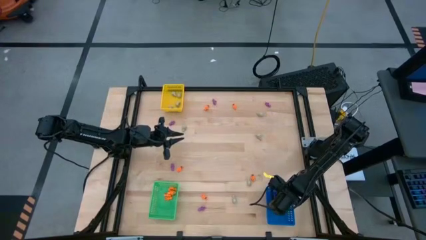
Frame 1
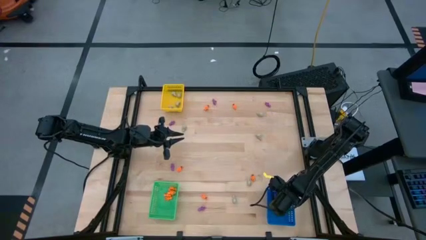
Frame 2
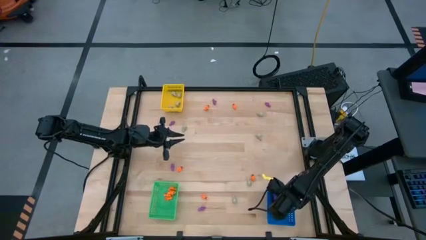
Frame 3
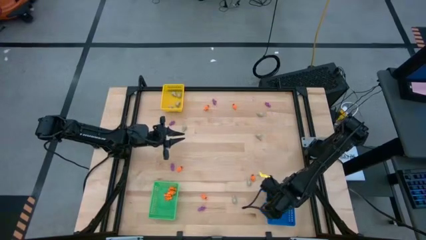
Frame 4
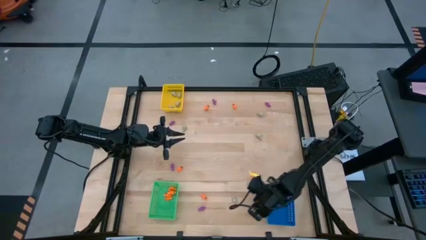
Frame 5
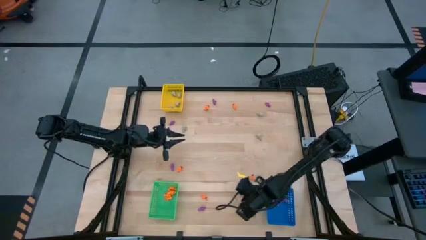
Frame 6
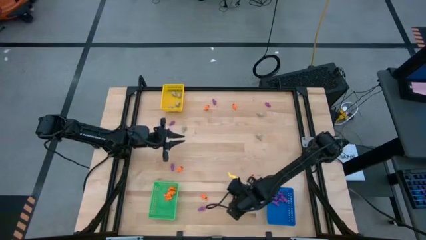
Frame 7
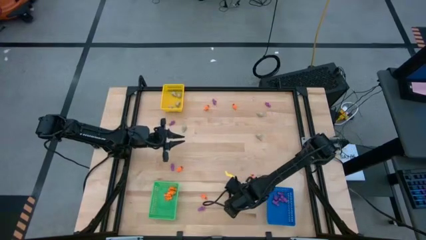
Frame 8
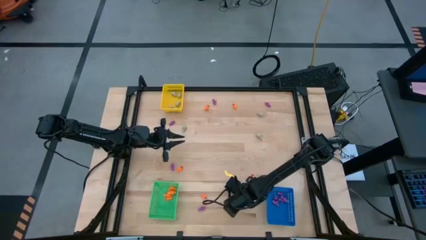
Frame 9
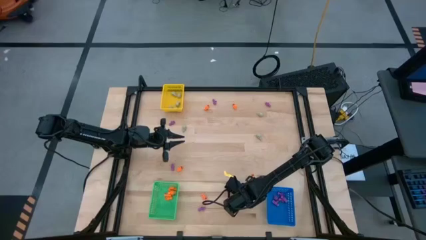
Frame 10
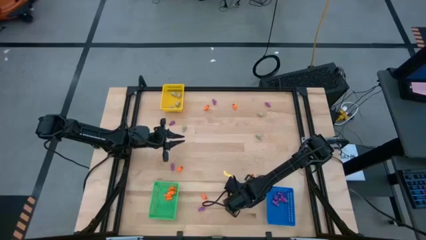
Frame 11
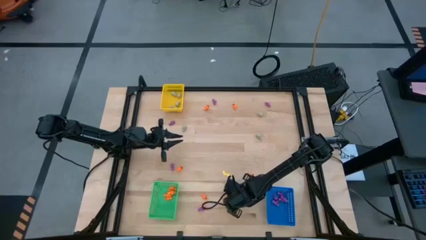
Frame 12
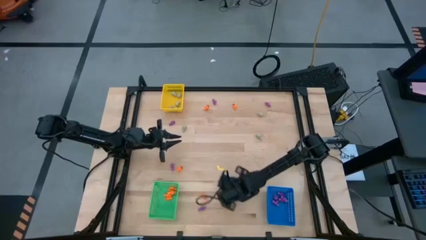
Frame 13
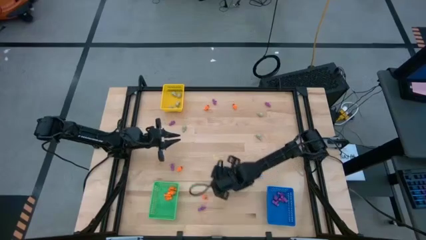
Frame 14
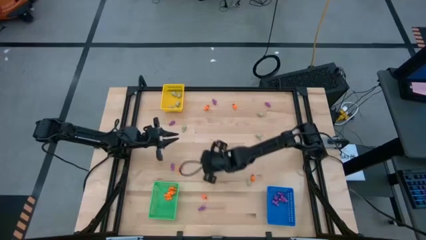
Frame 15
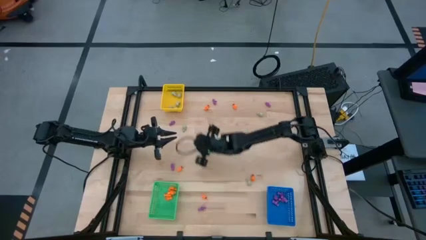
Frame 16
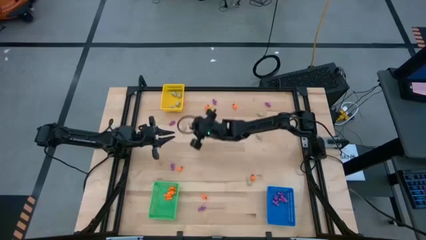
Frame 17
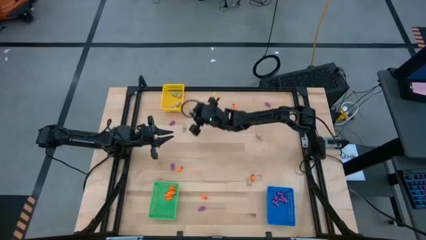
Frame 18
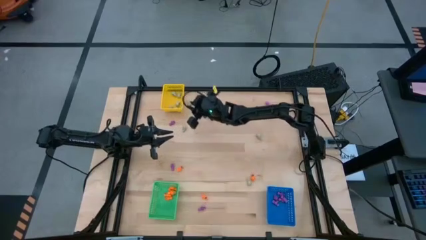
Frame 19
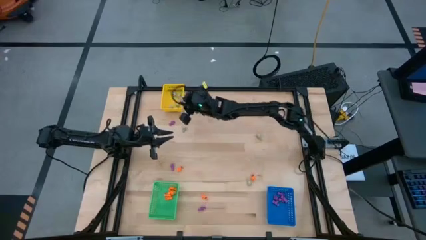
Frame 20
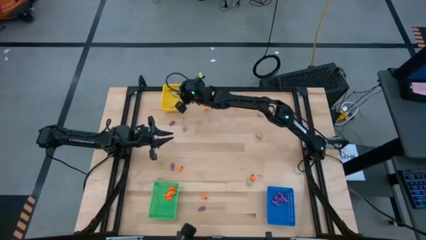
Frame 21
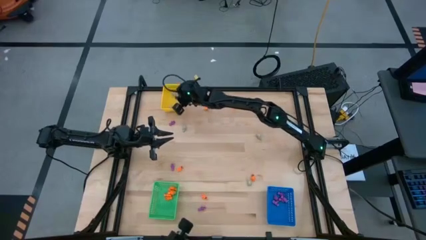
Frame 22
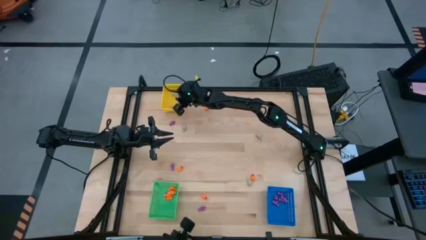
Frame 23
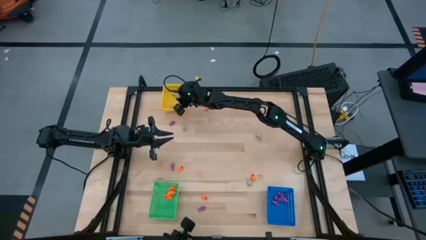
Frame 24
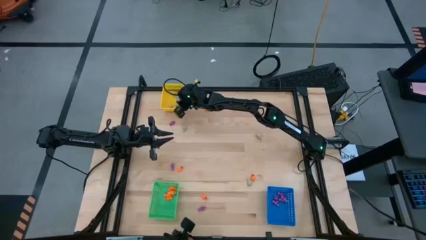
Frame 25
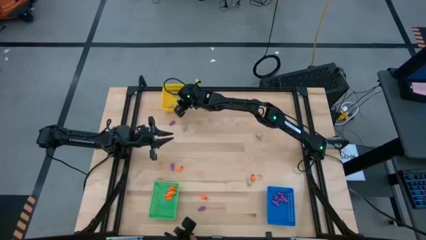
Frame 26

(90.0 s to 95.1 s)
Task: Sort Halloween decoration
Put the gray skull toy into the yellow bin

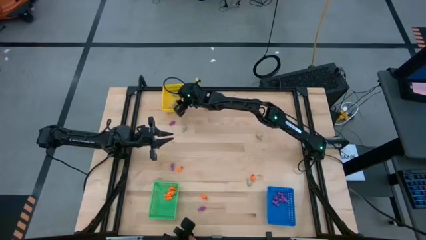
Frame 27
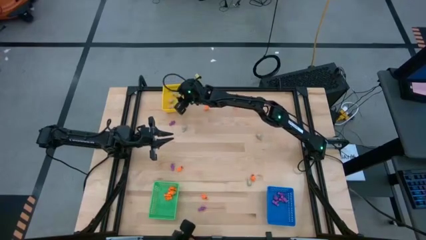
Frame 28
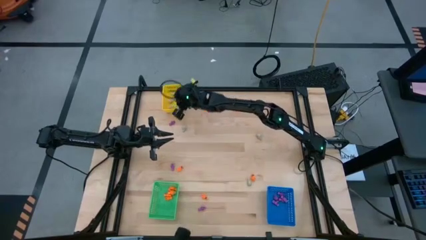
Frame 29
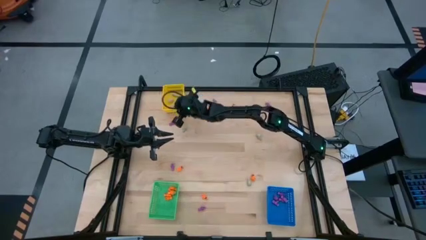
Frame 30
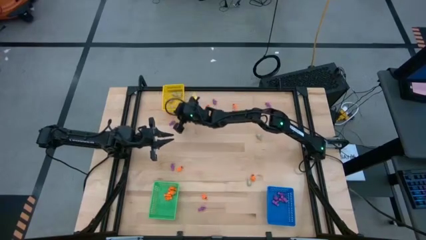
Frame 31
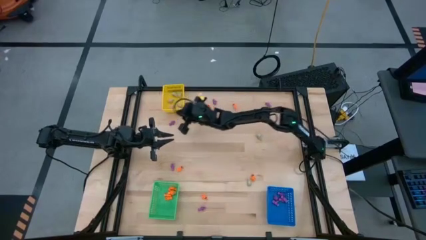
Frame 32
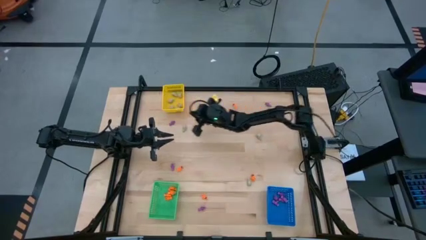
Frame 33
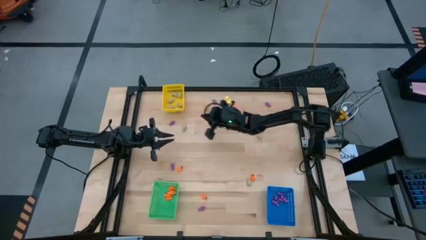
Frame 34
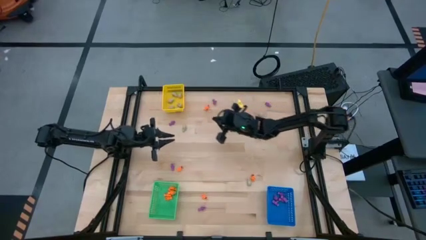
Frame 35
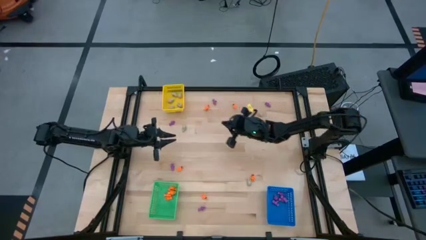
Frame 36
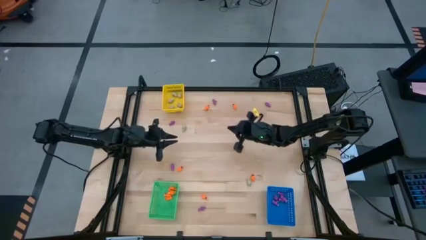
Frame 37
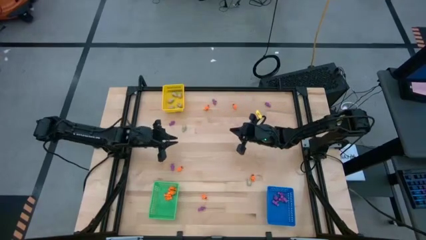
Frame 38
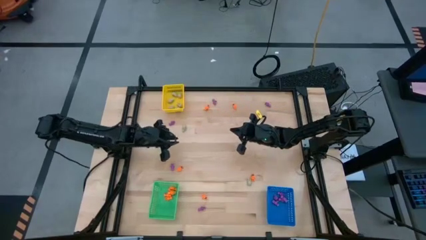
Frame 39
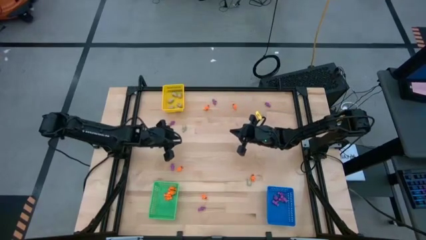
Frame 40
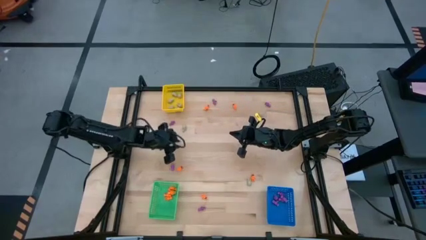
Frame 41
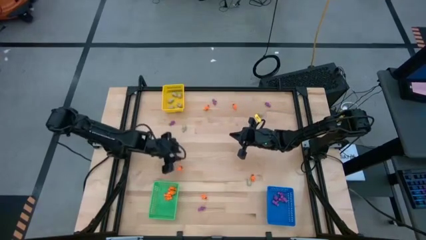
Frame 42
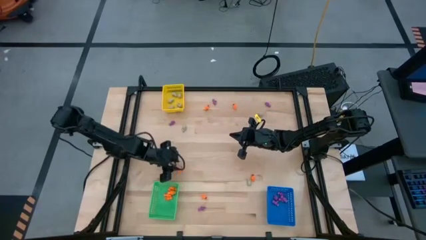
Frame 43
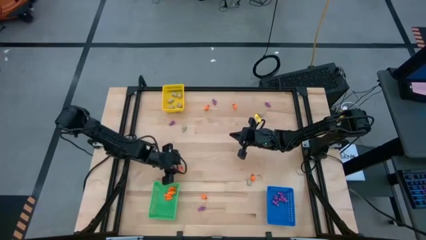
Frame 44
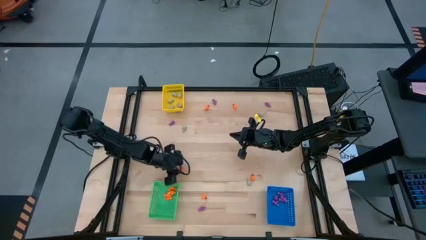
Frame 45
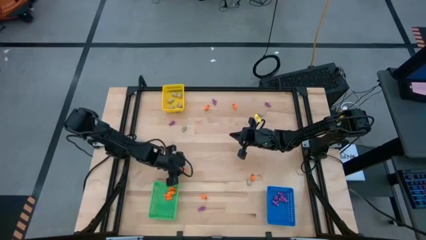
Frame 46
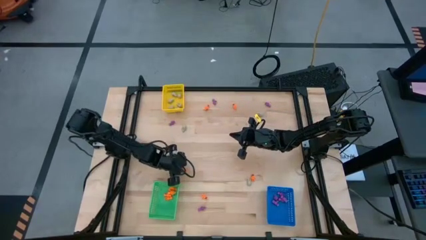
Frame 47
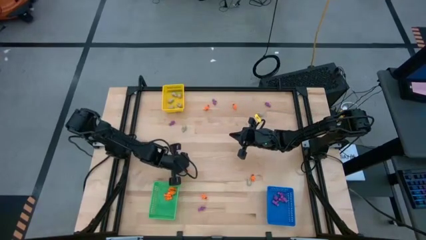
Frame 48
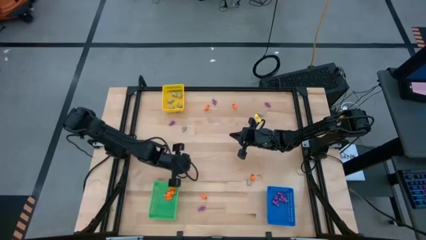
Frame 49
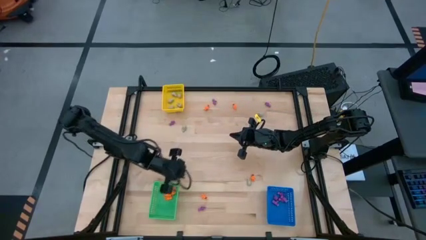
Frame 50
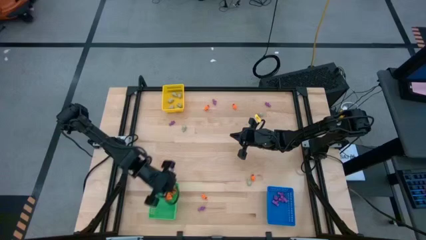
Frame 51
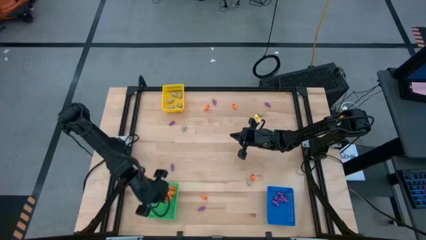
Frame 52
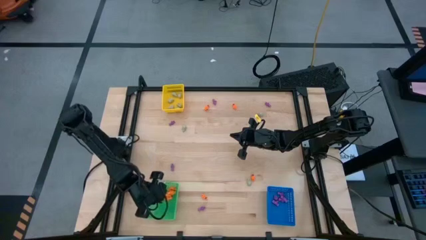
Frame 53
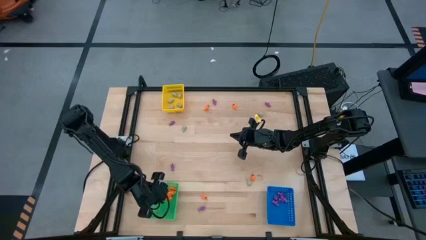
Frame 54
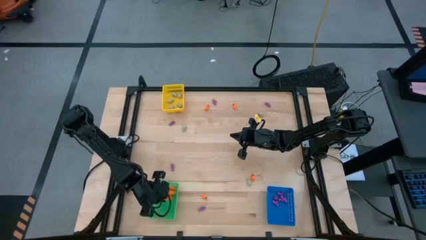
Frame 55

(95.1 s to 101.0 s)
Put the orange skeleton toy into the green bin

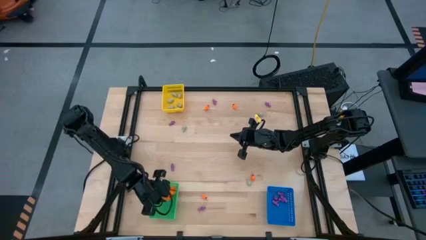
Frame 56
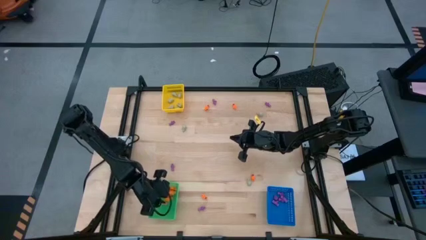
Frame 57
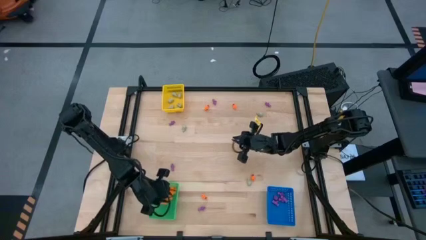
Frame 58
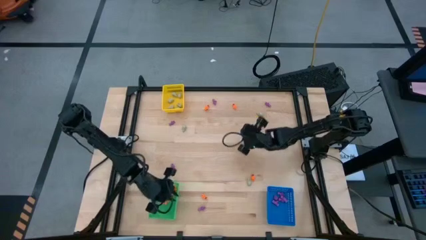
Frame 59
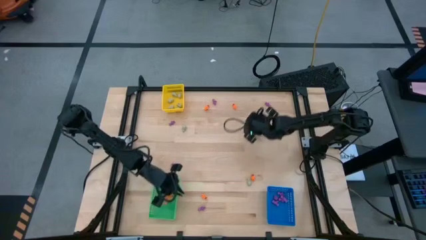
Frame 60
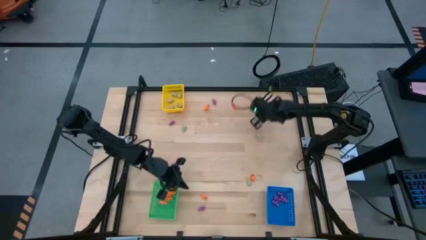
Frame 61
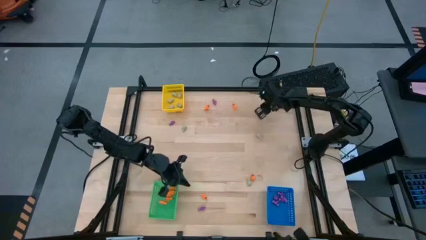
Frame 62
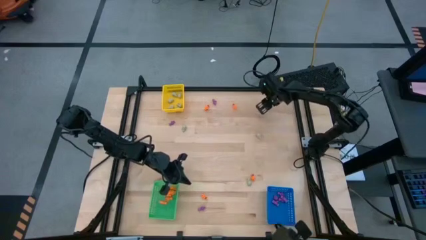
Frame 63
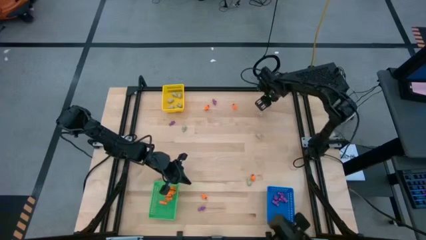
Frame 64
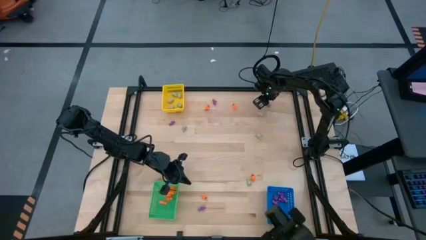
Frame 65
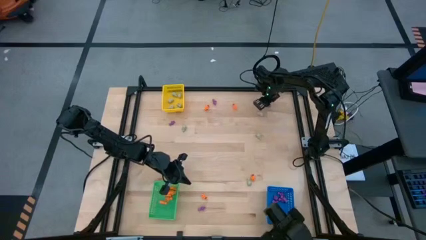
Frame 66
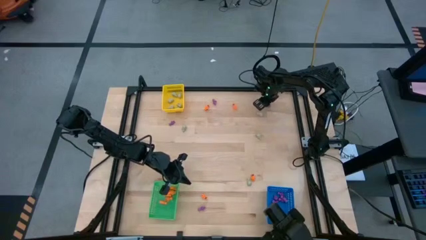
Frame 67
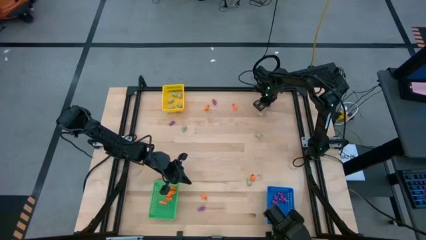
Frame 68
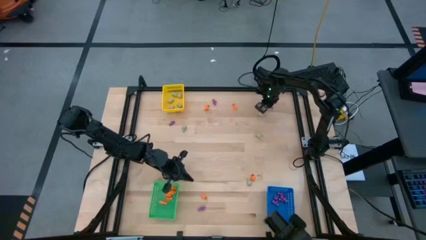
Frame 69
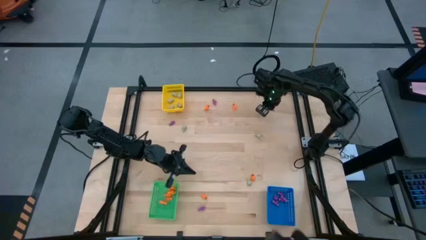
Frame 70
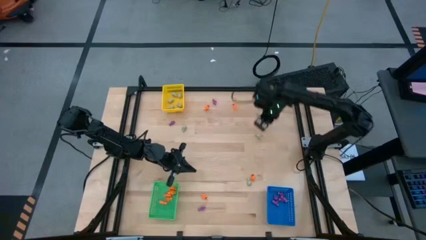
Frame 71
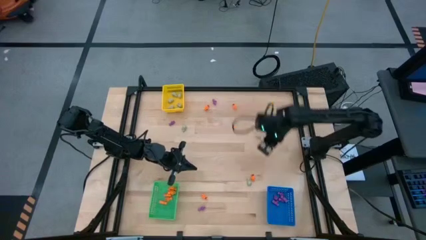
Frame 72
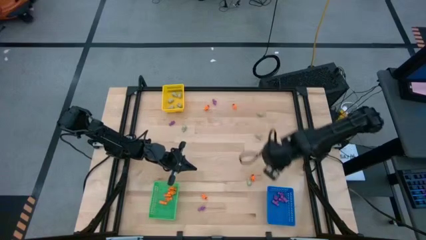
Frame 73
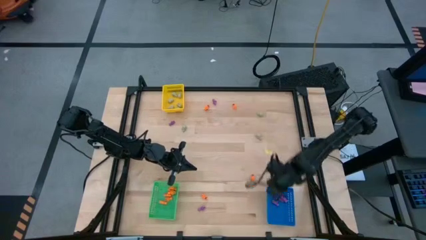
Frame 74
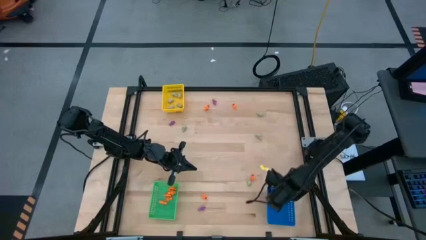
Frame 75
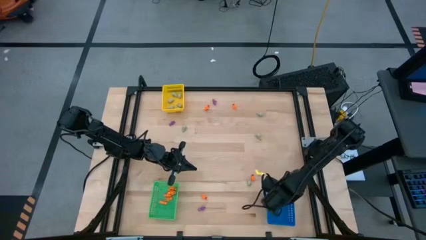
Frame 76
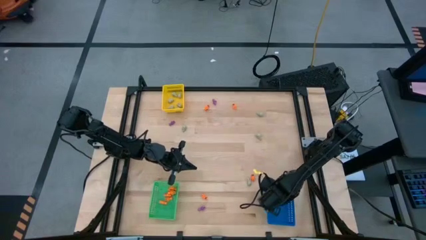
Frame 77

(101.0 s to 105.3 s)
Put the purple skeleton toy into the blue bin

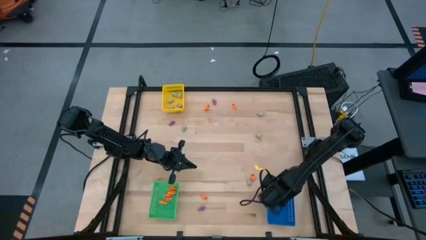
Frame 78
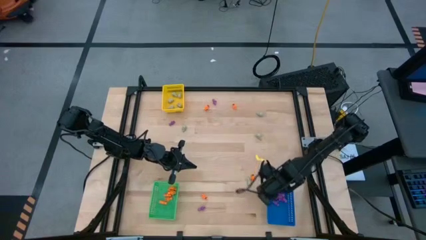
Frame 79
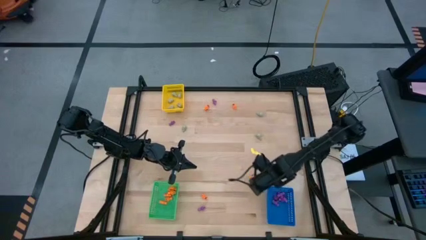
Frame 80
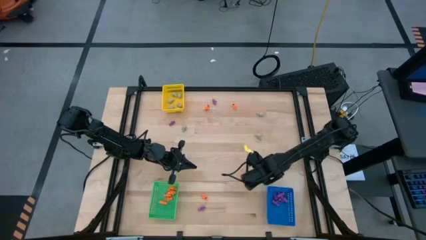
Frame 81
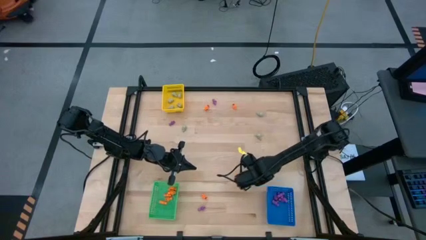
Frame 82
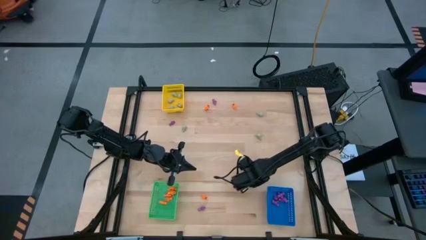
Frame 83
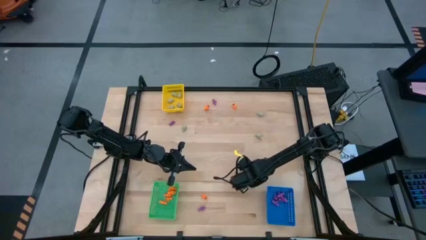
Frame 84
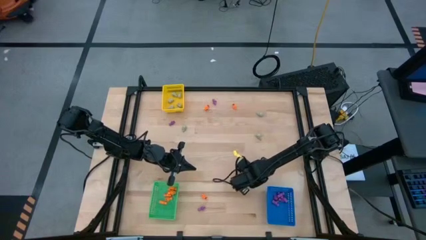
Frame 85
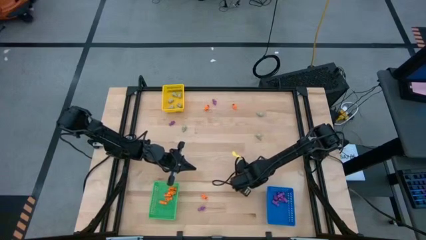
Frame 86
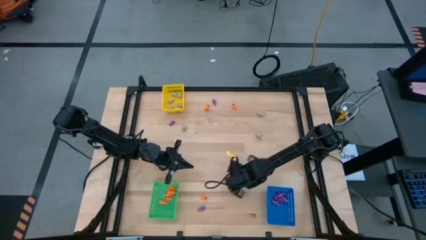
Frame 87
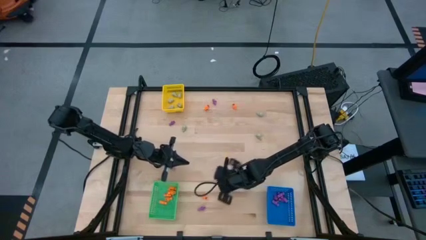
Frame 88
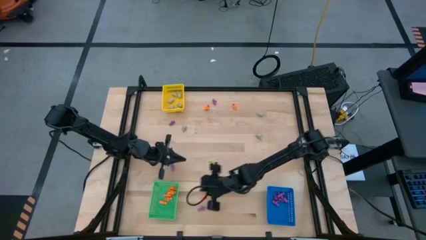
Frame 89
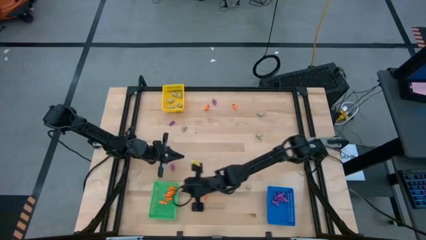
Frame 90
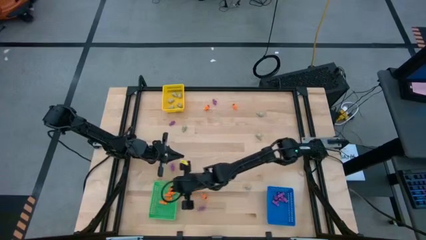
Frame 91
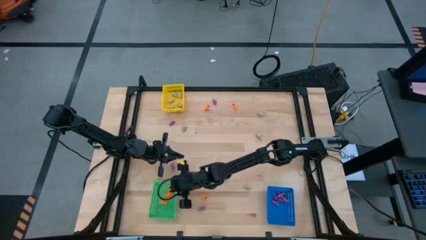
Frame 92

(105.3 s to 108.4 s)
Put the orange skeleton toy into the green bin
